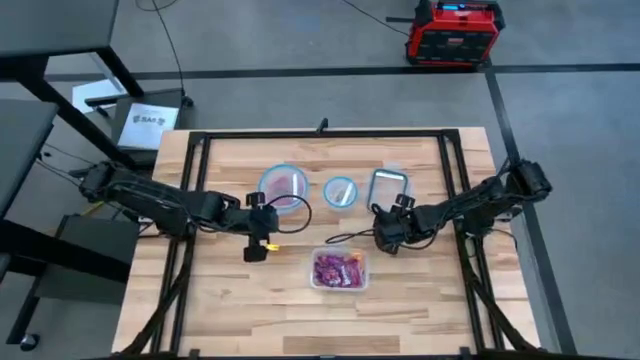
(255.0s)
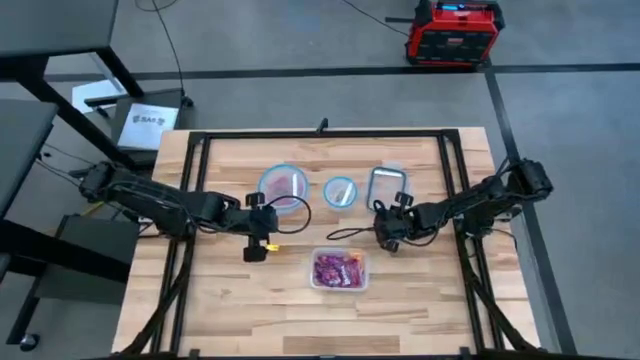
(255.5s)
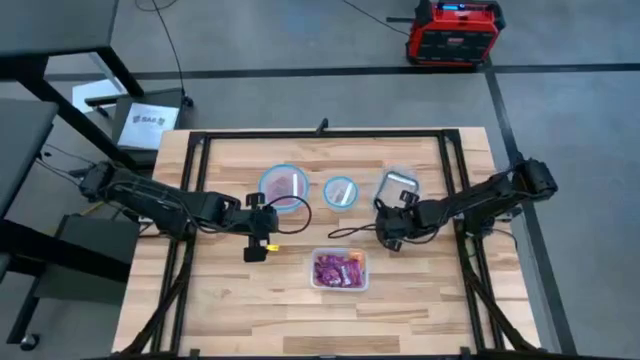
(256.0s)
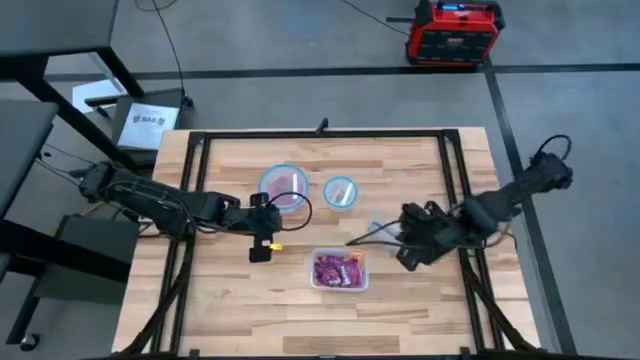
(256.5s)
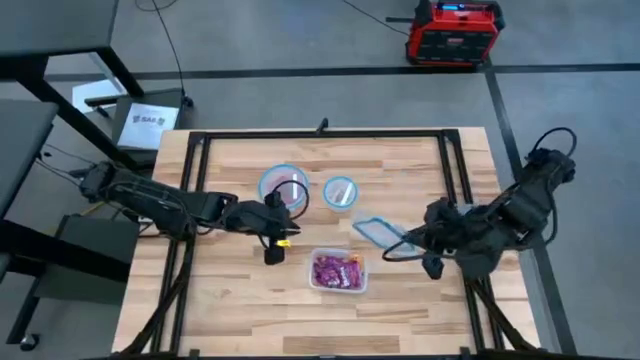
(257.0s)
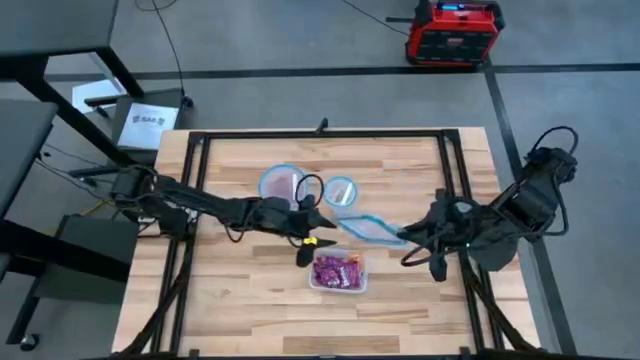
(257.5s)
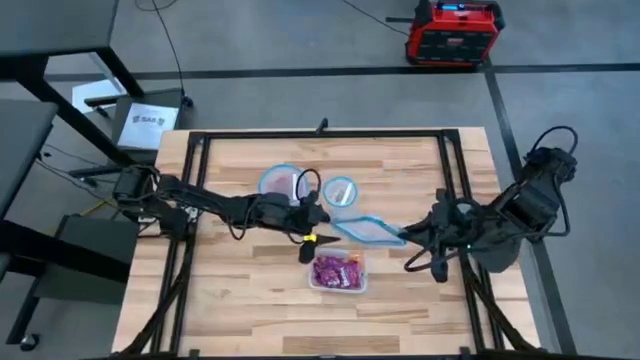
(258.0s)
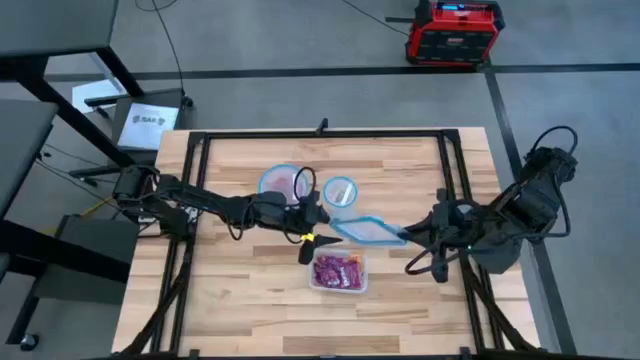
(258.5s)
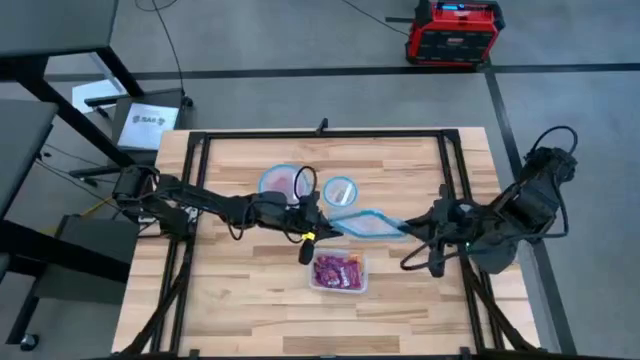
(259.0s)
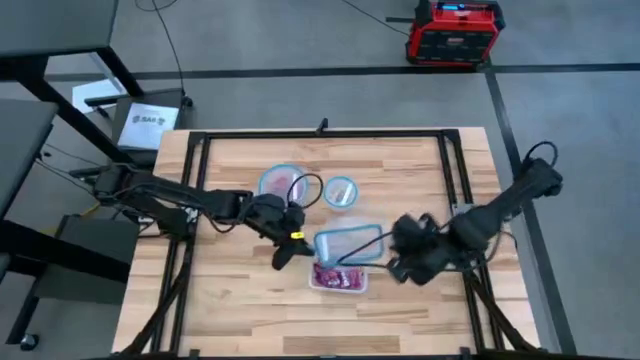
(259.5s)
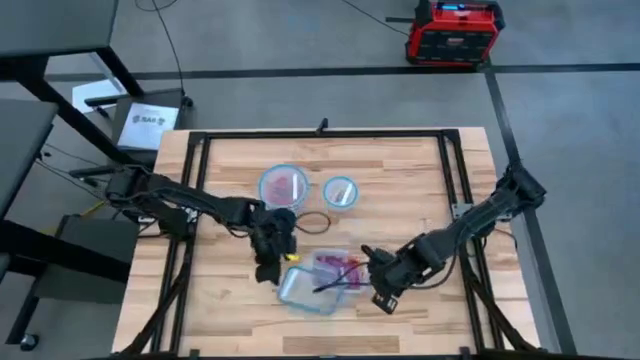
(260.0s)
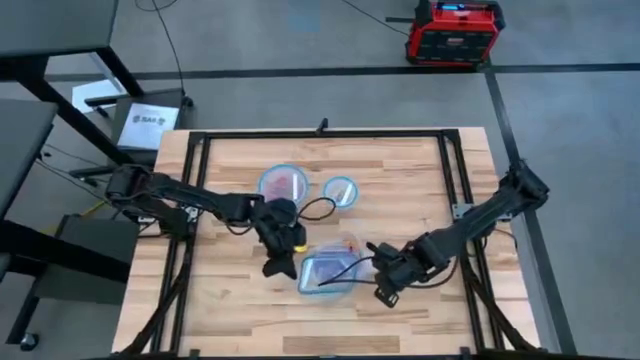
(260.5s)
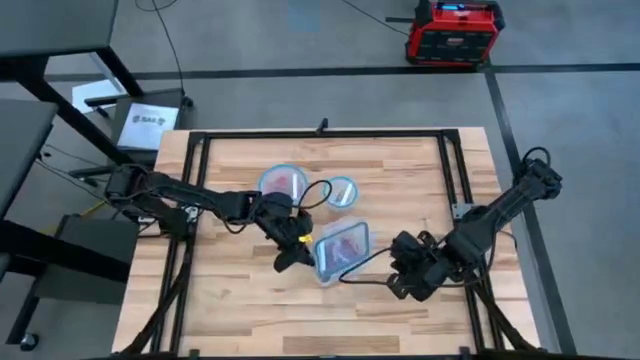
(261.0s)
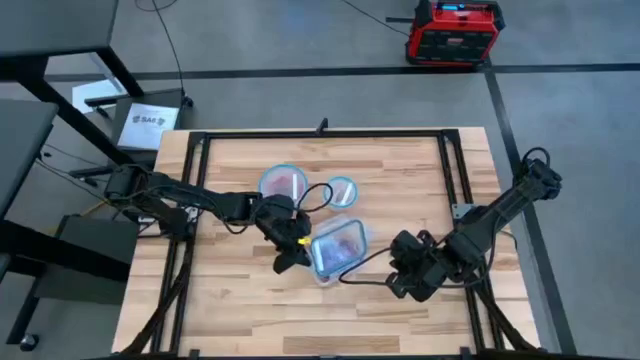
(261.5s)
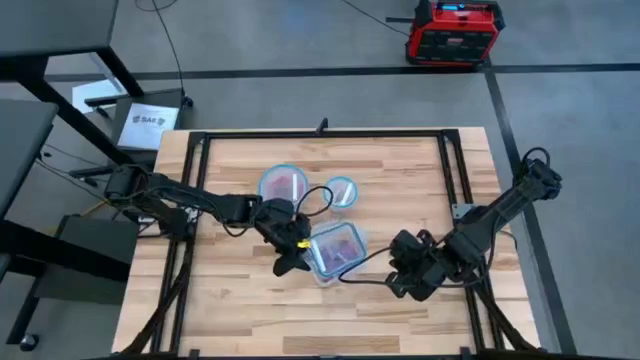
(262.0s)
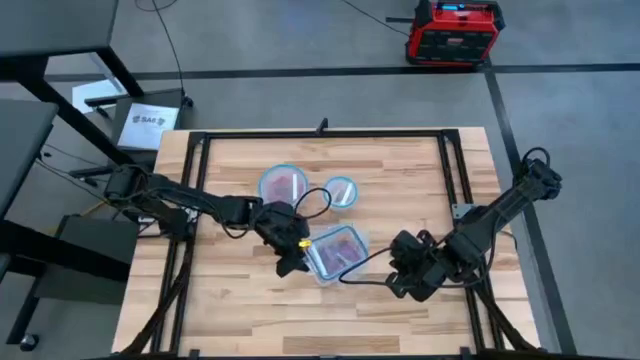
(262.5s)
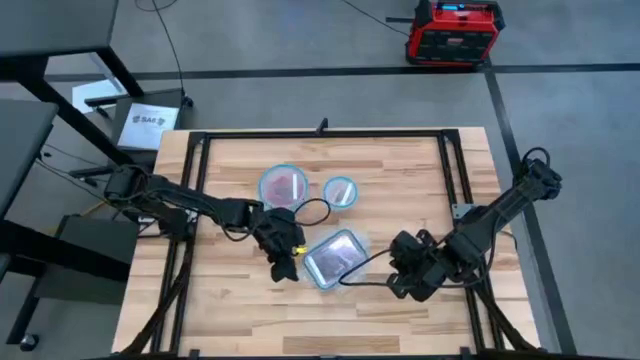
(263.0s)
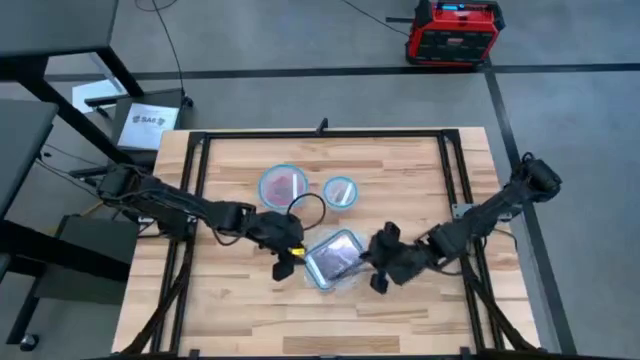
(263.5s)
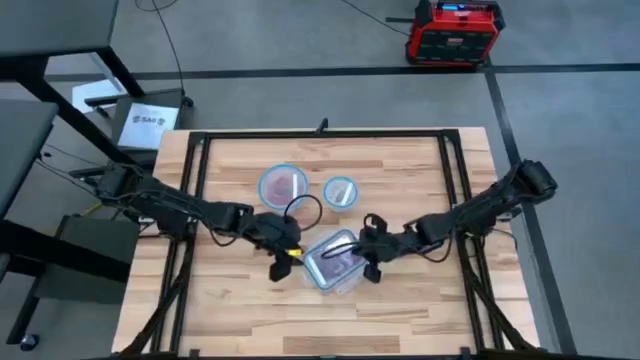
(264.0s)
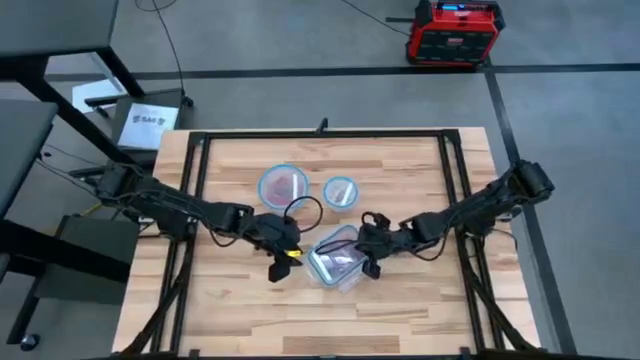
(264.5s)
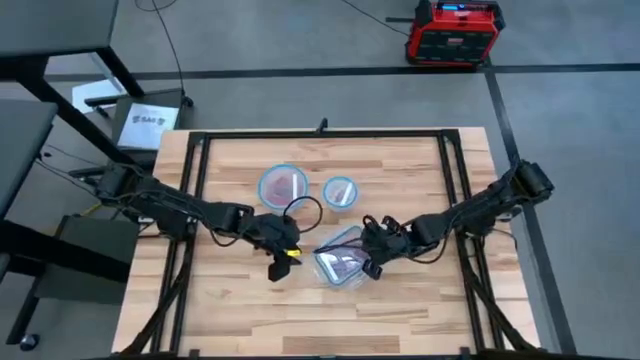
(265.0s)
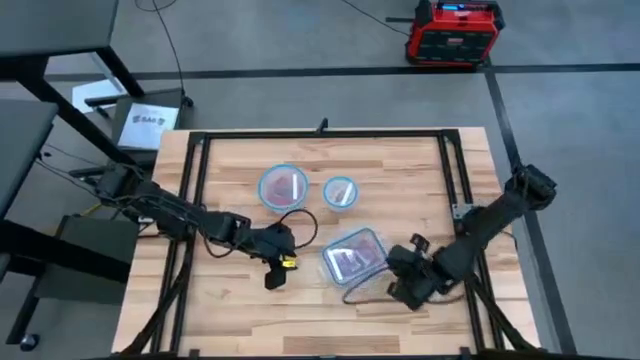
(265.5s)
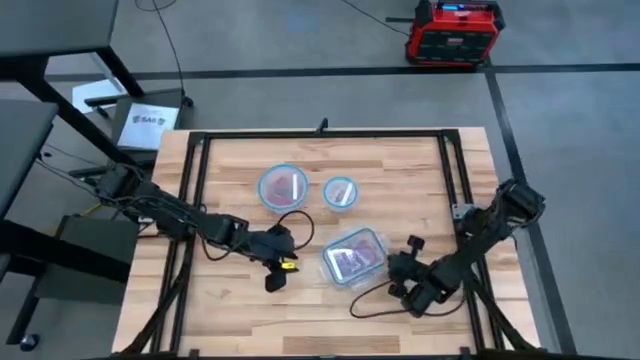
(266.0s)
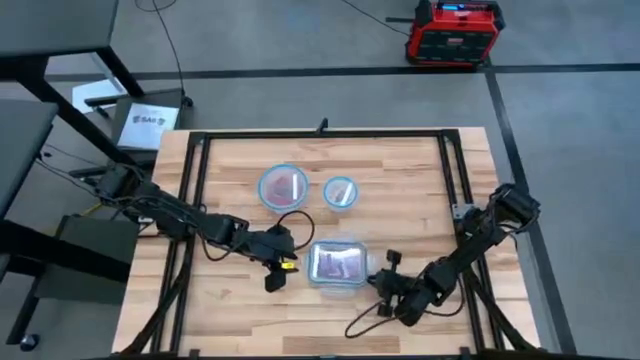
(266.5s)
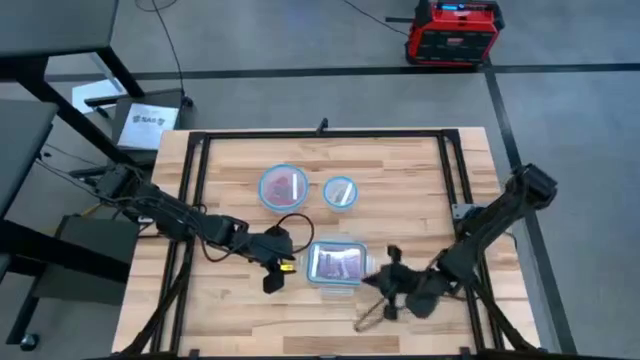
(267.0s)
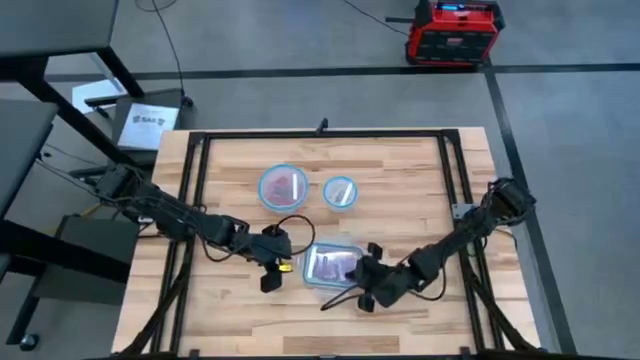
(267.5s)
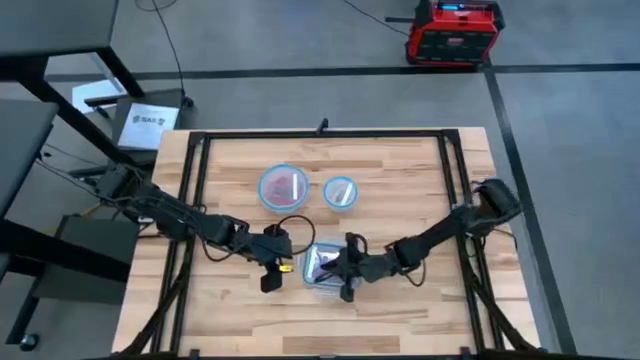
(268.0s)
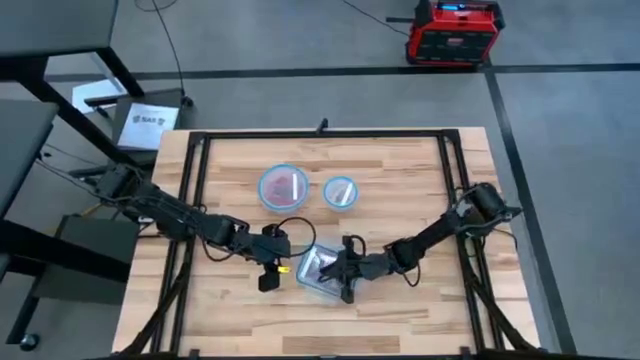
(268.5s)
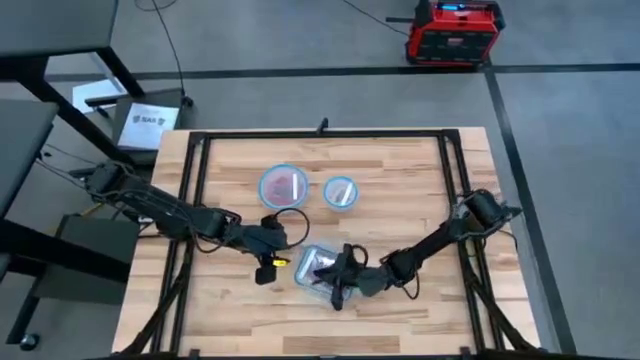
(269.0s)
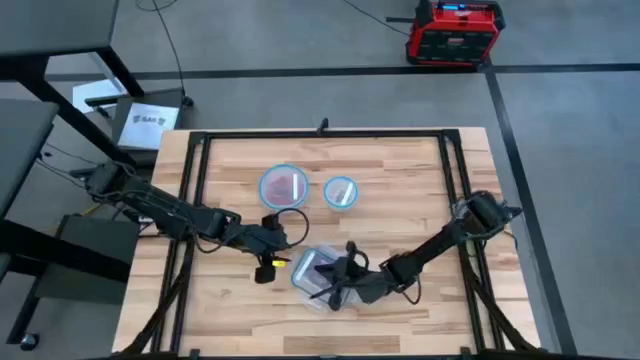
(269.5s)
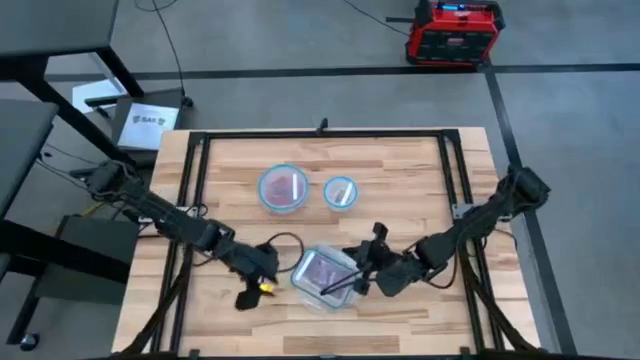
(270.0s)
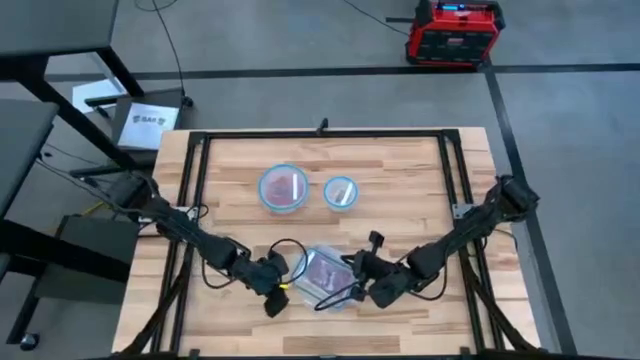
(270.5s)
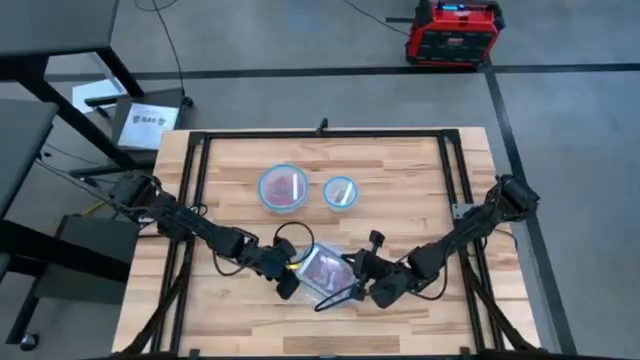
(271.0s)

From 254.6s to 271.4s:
Task: Sort candy
Close the center transparent bin with the lid

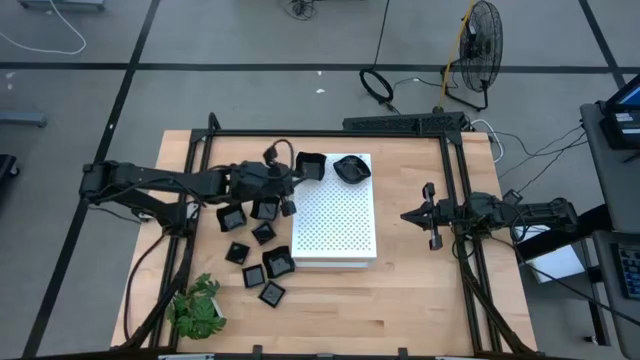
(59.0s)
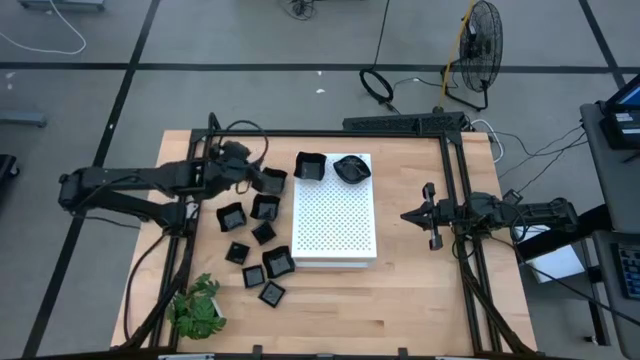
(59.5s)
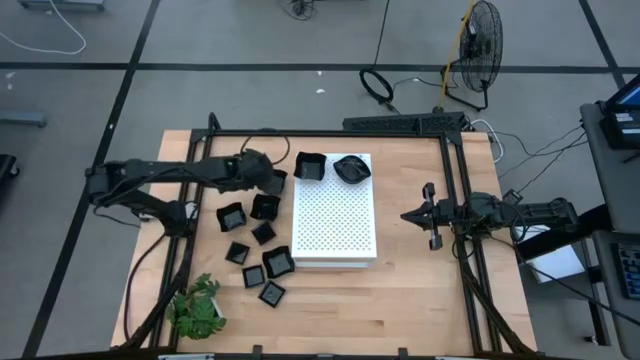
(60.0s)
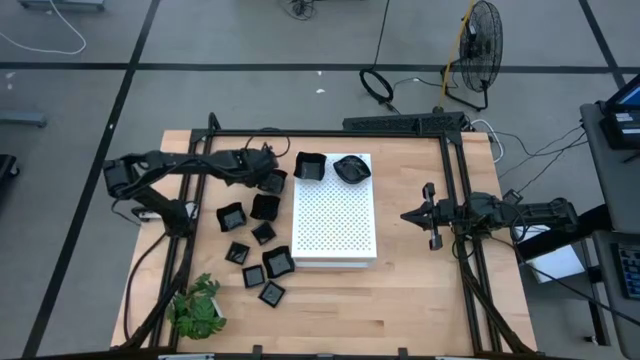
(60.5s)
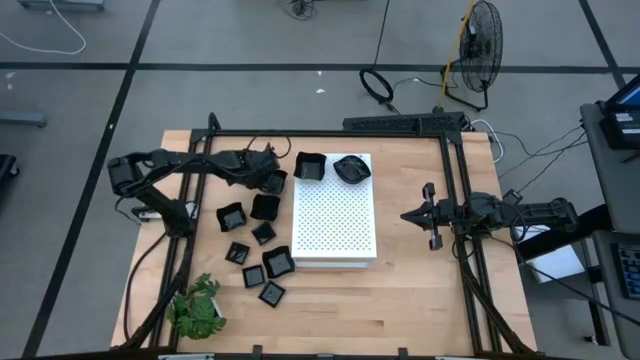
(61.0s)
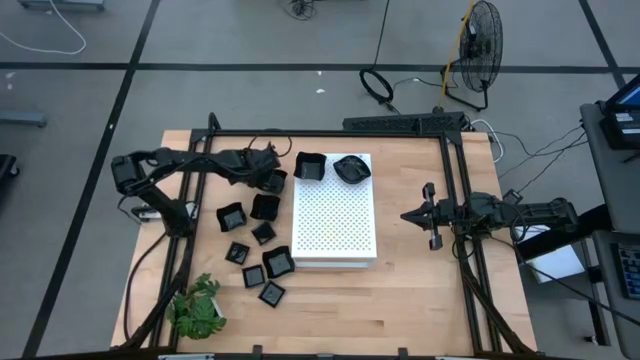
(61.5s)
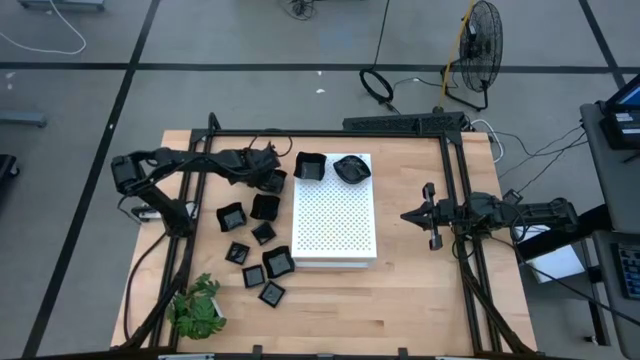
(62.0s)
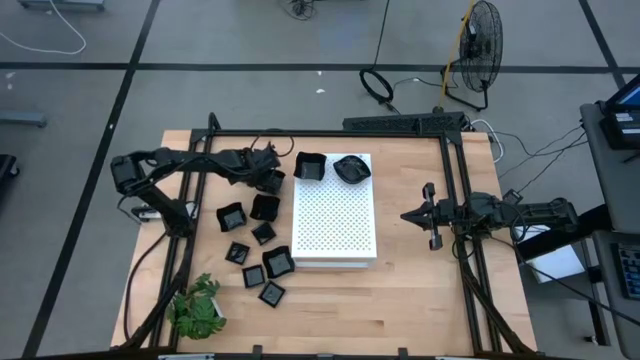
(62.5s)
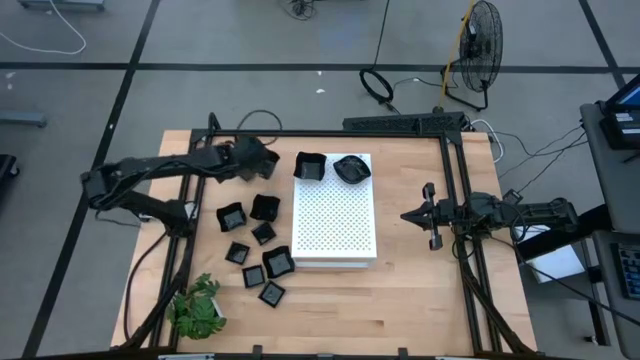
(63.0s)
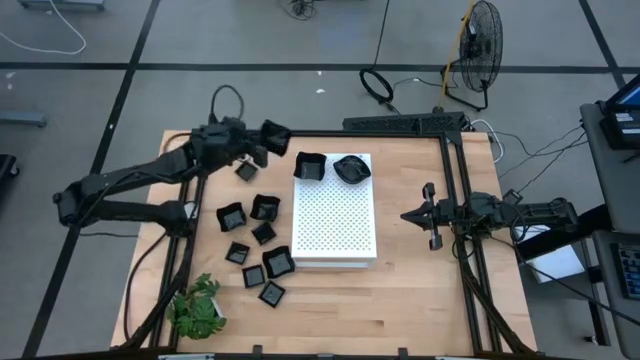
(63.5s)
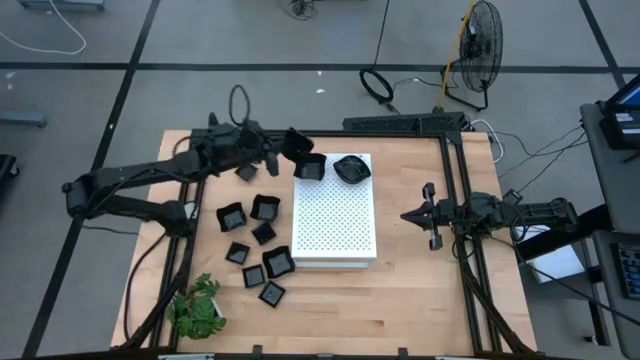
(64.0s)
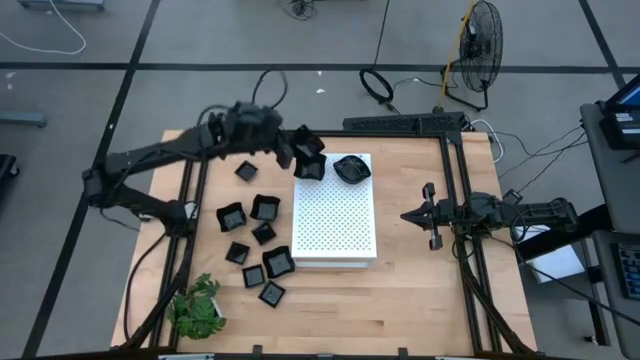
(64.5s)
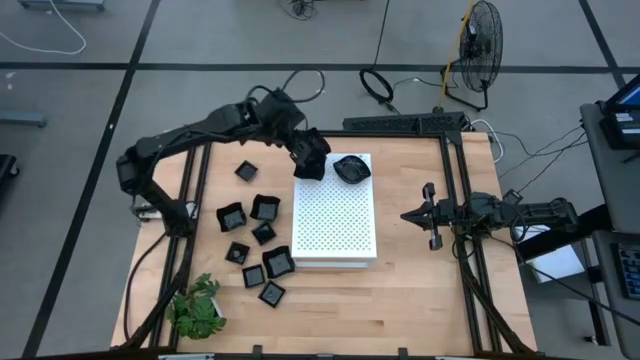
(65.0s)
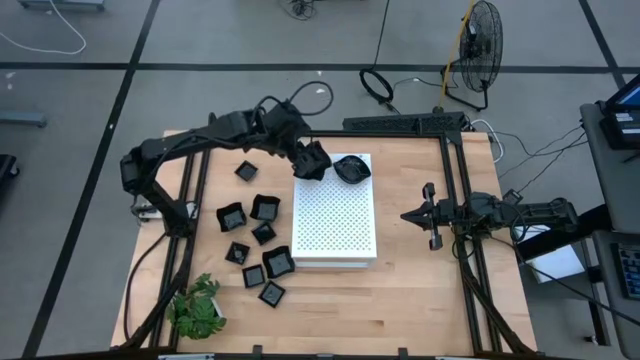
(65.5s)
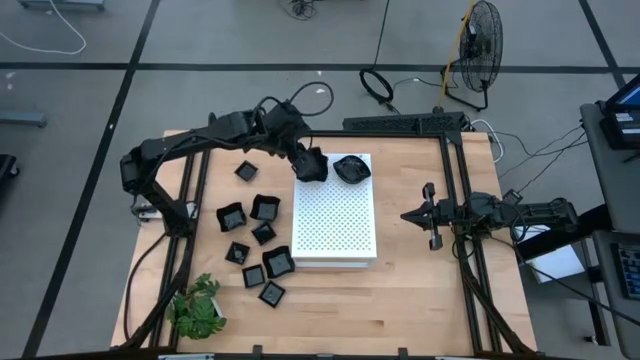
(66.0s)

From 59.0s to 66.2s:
Task: Pick & Place Mini shaped plates
Stack the black distorted square plate on top of the other black distorted square plate on the shelf
